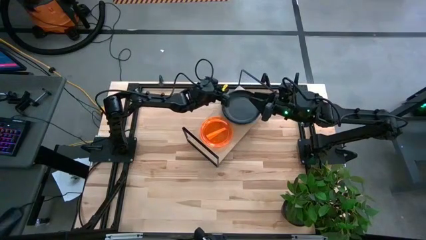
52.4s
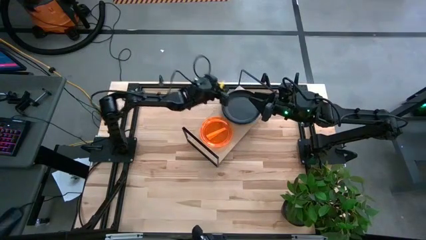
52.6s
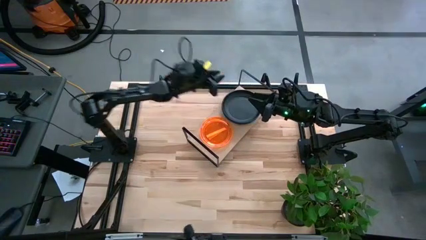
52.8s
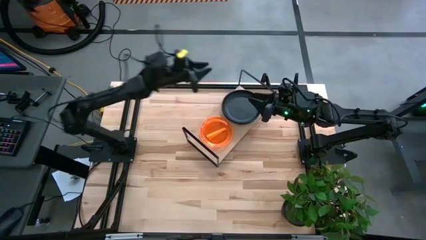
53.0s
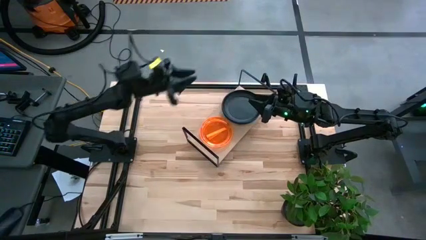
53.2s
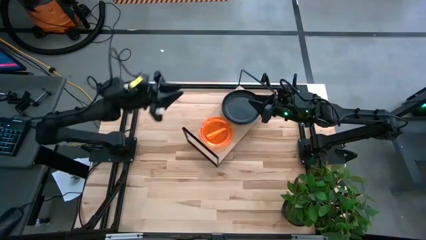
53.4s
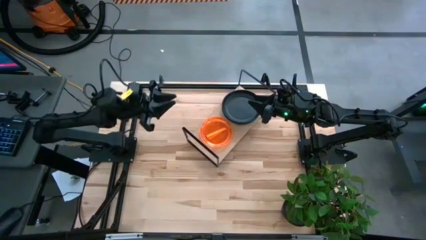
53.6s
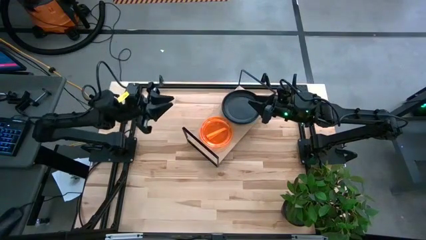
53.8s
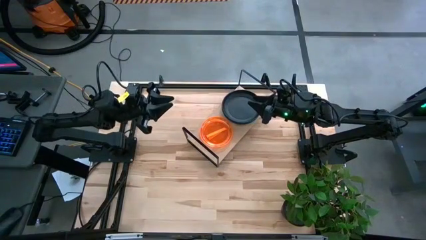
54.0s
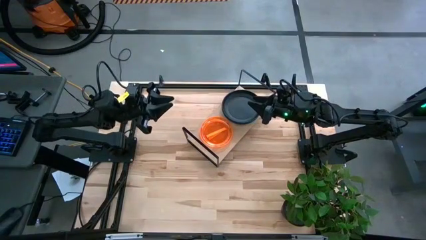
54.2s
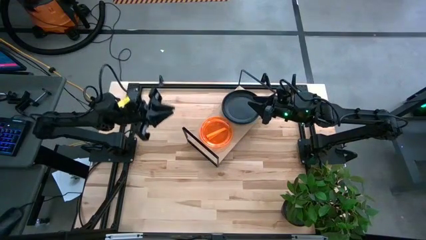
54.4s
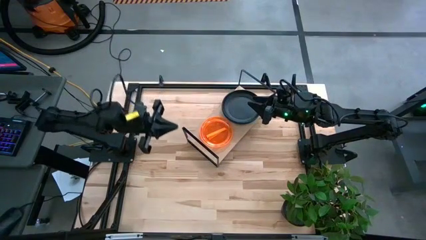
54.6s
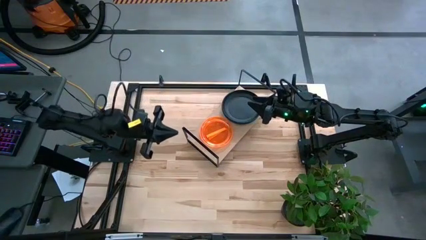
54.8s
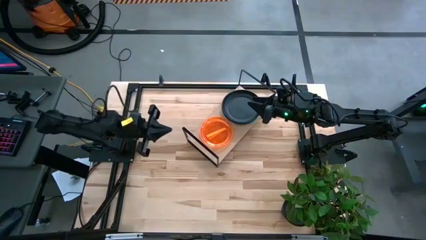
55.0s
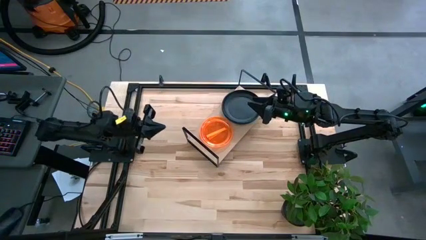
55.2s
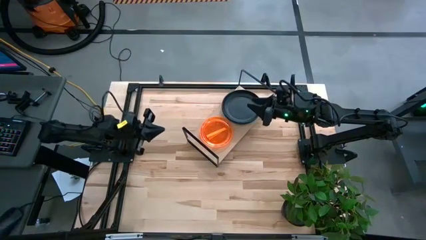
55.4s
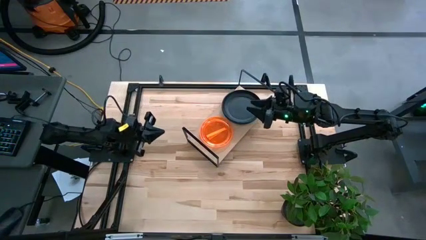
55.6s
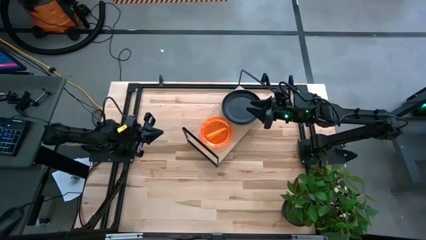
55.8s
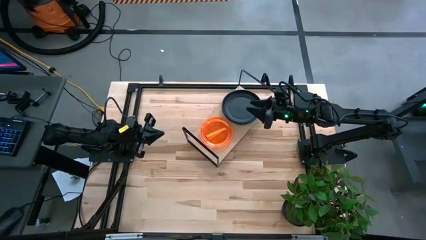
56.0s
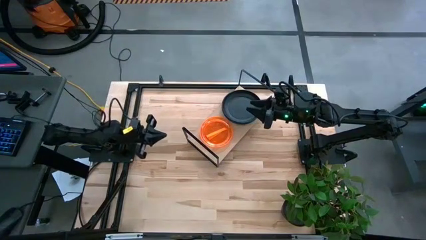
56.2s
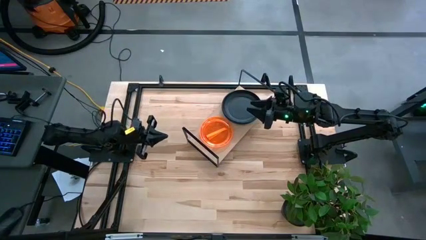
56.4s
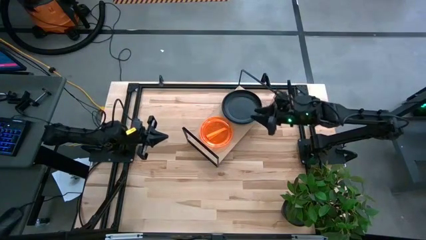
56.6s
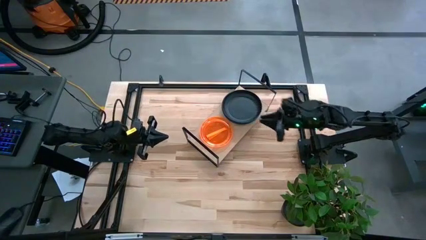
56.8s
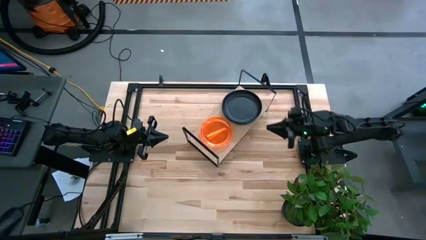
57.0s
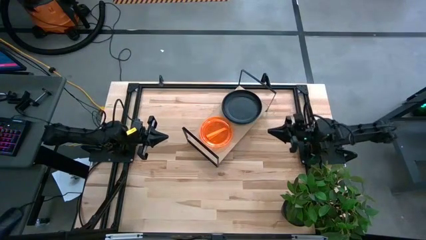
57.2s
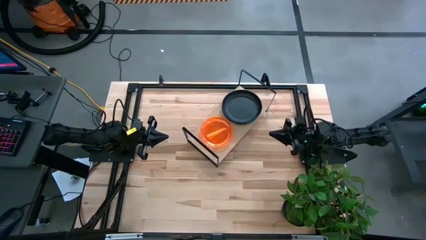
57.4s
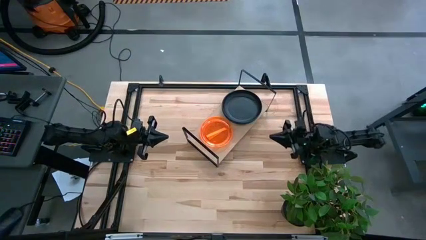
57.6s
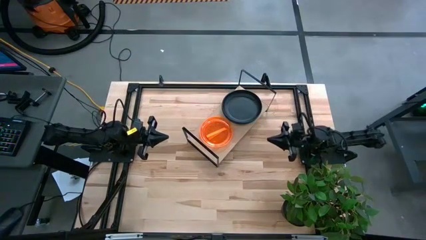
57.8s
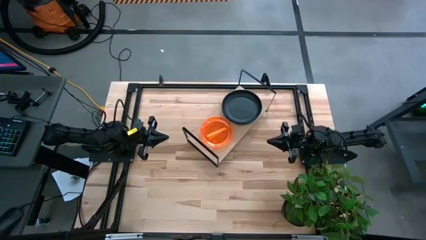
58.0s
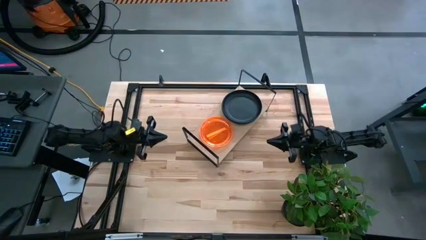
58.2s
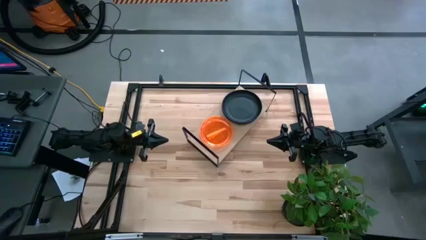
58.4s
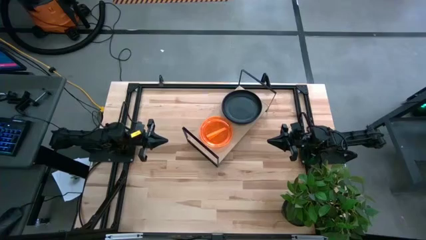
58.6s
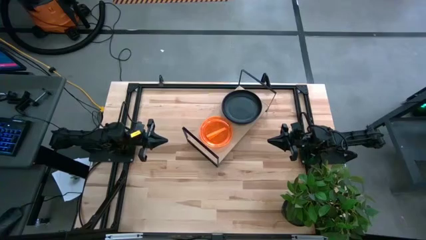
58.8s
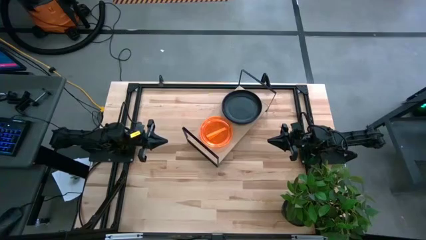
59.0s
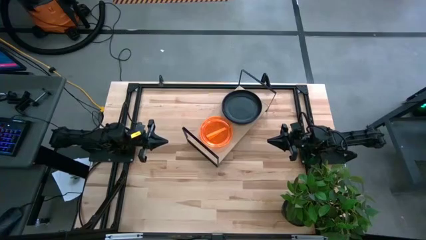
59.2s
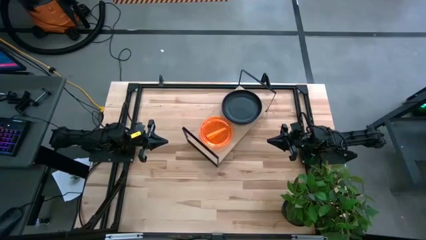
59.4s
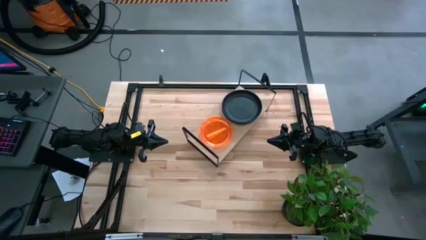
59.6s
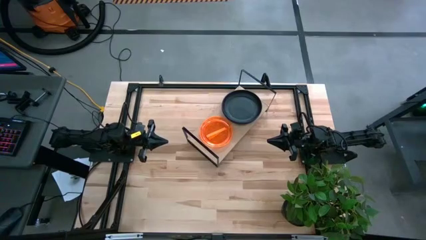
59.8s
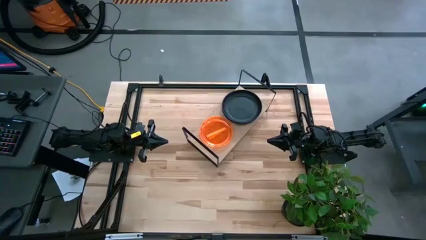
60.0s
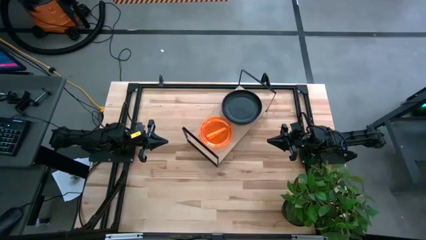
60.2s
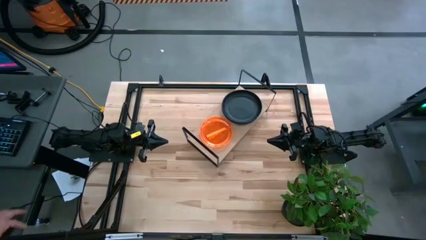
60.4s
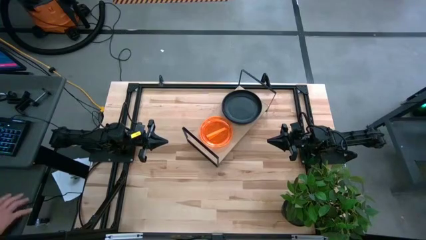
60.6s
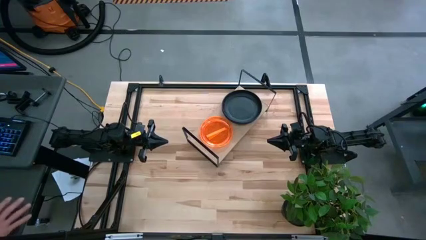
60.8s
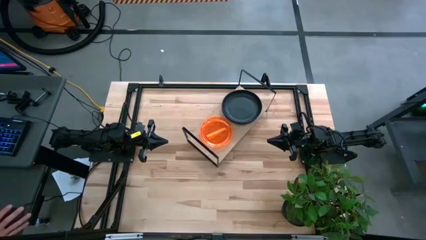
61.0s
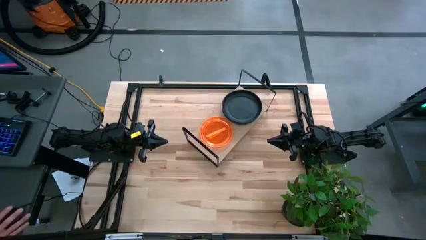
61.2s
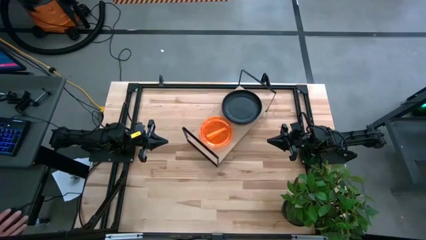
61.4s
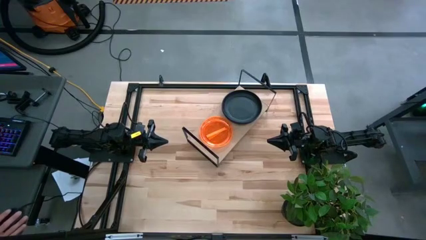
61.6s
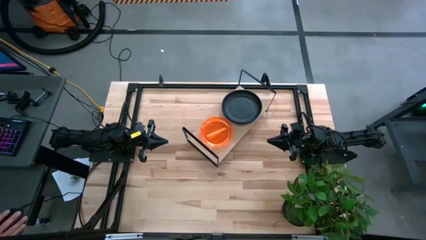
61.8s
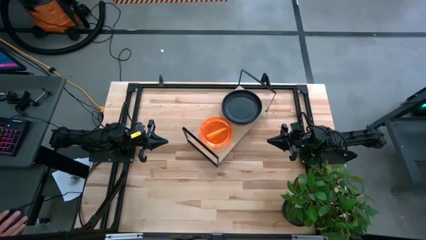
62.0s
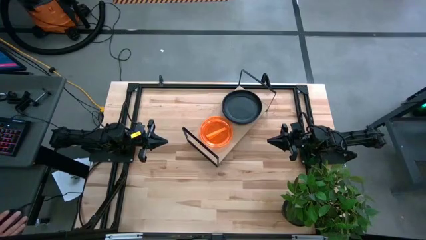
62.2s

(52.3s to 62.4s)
Task: Place and stack plates onto a shelf
Return to Home Position

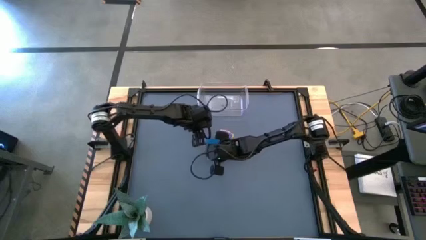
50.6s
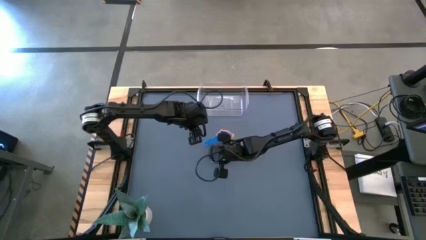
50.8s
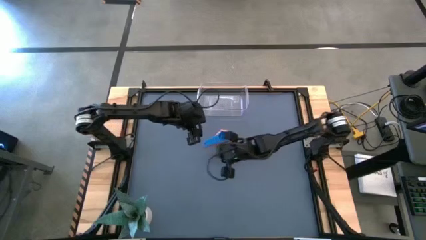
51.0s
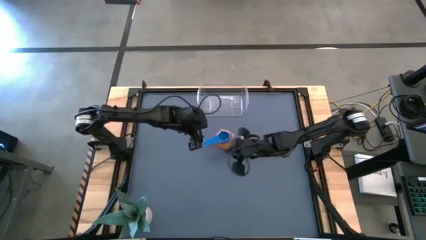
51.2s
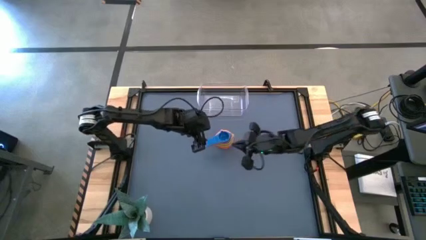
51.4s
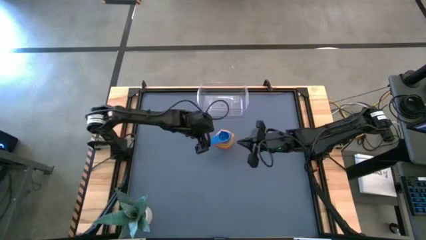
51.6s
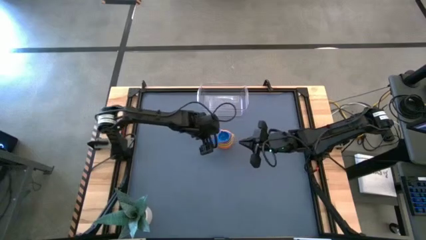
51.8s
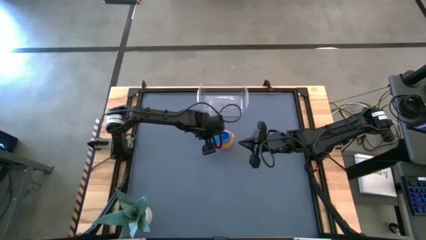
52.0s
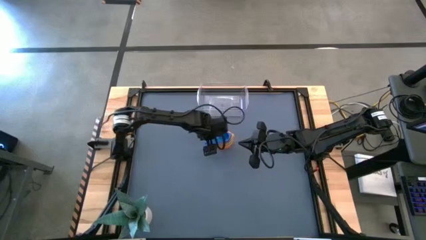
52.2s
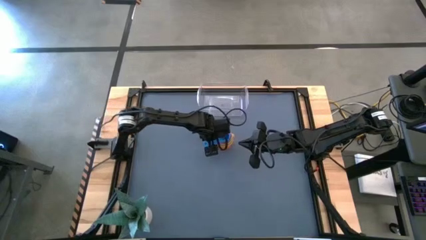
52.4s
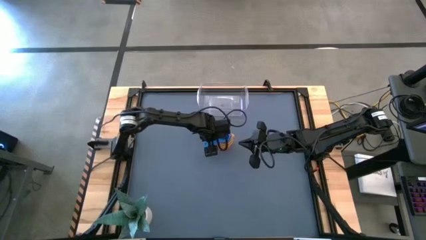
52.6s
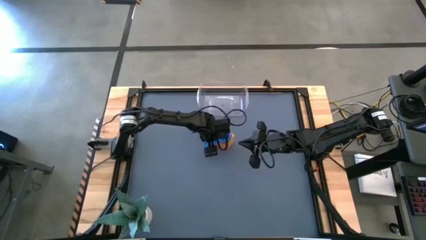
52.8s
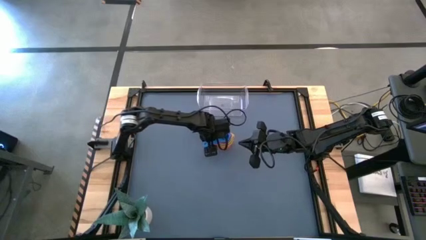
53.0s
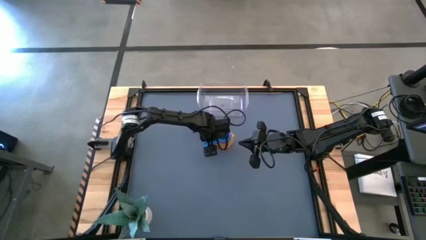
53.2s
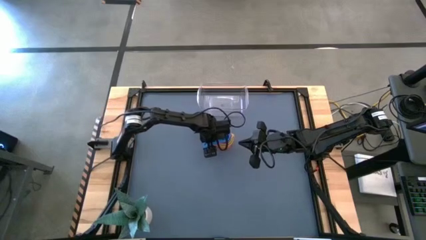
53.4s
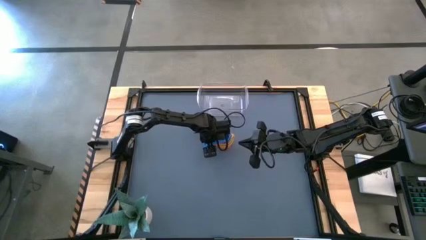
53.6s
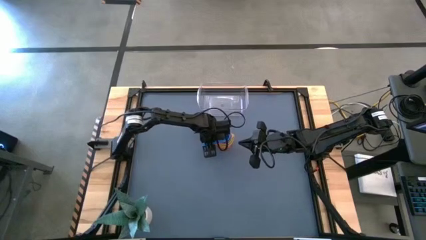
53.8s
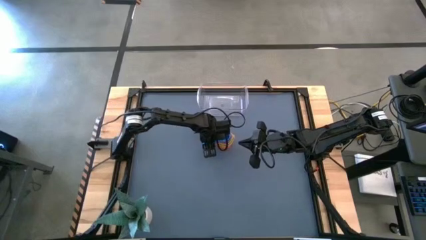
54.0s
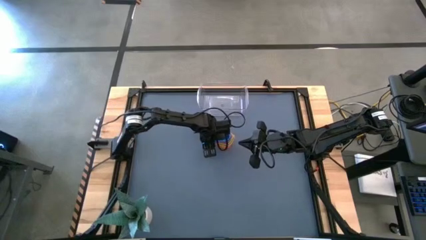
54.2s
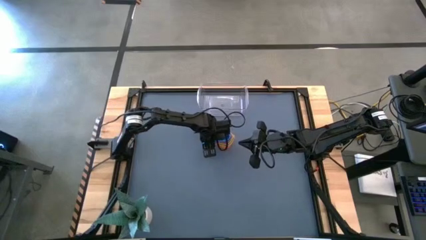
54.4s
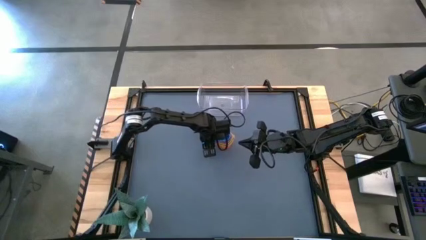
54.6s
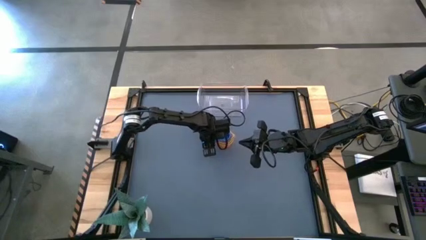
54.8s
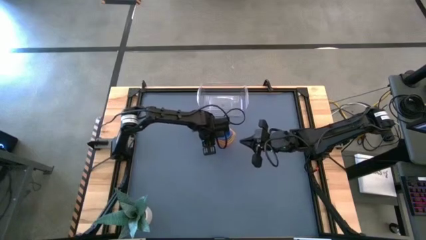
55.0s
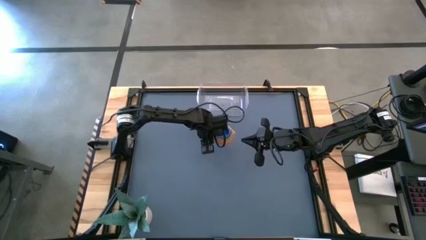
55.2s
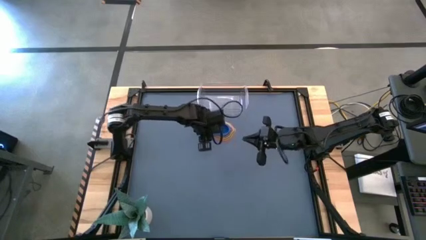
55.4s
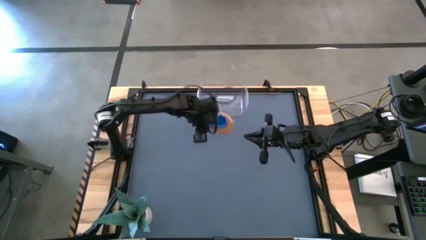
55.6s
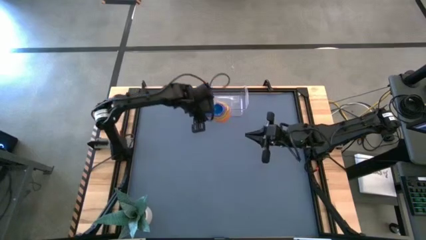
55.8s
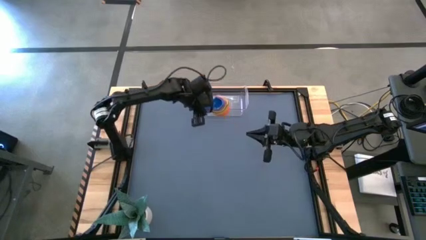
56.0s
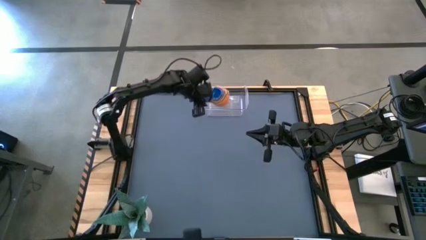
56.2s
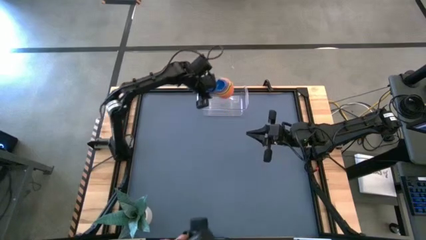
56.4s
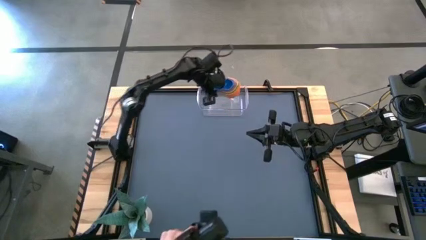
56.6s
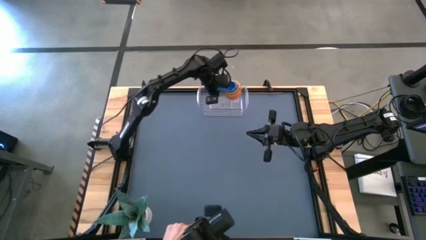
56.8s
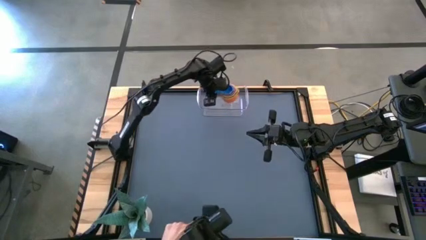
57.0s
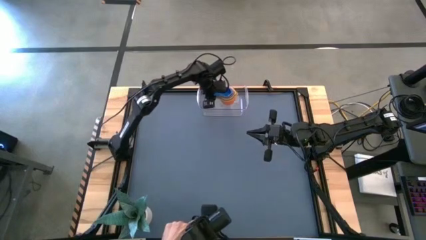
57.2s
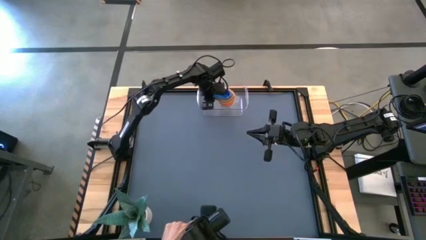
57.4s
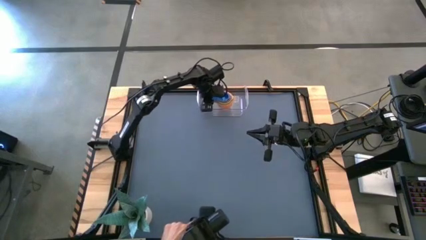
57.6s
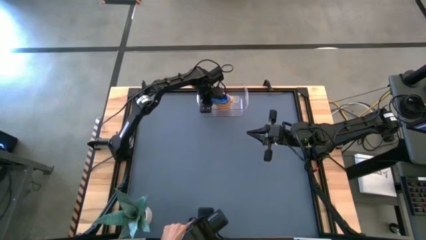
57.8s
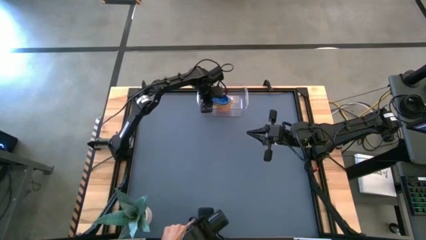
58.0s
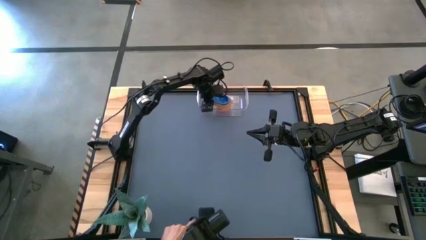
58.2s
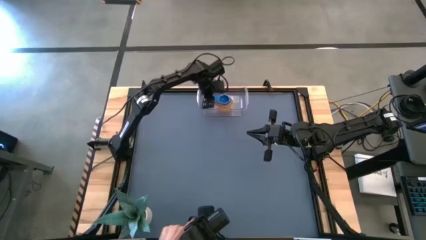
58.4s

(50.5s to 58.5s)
Task: Nest measuring cups in basket
Put the nested measuring cups into the transparent bin
